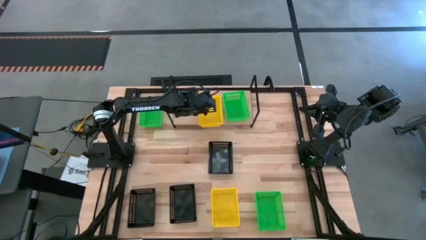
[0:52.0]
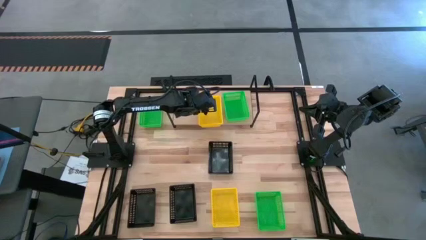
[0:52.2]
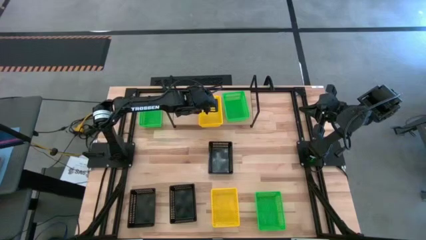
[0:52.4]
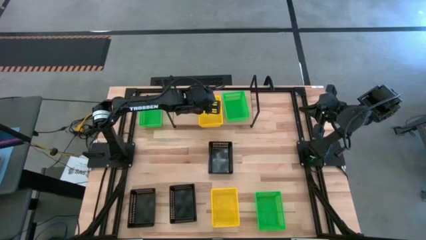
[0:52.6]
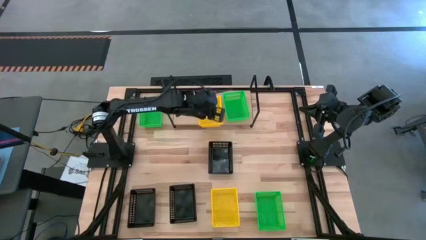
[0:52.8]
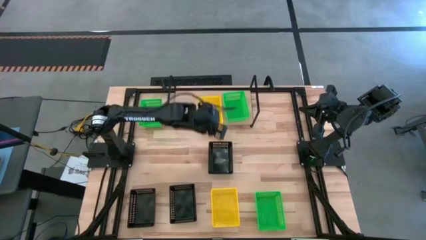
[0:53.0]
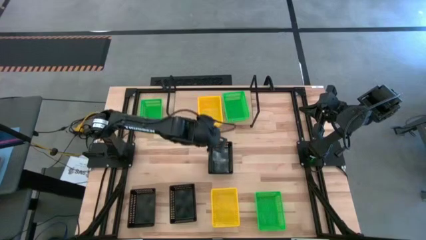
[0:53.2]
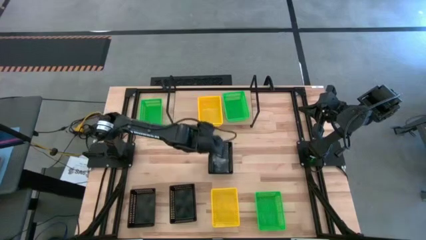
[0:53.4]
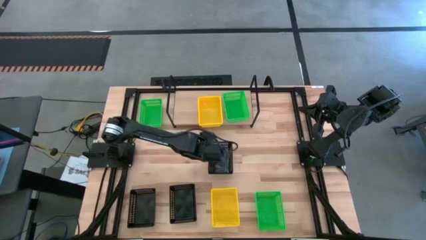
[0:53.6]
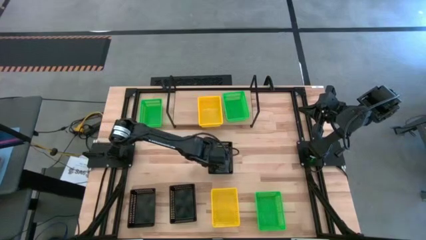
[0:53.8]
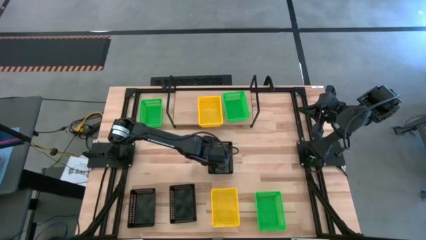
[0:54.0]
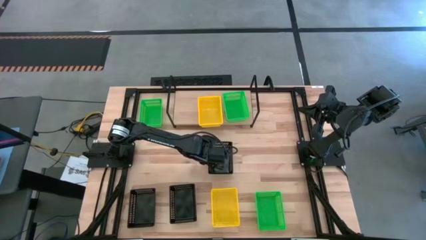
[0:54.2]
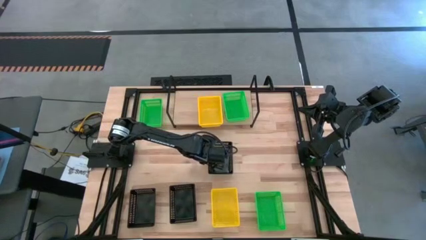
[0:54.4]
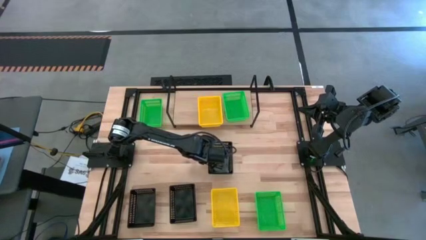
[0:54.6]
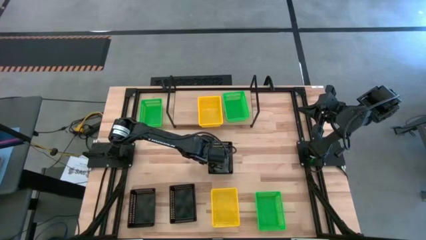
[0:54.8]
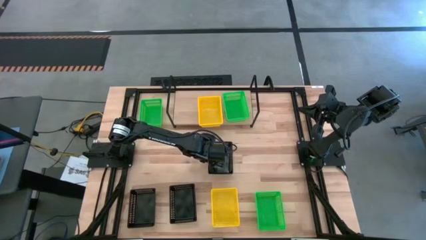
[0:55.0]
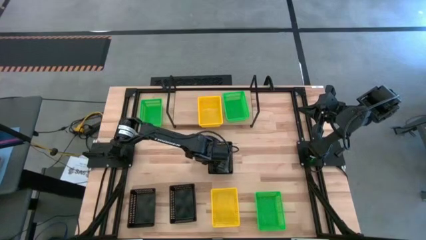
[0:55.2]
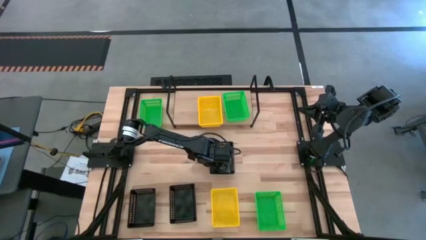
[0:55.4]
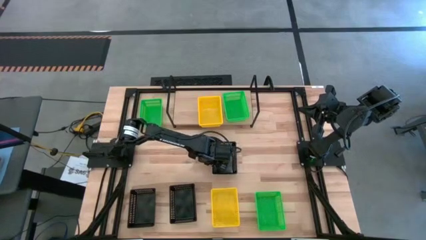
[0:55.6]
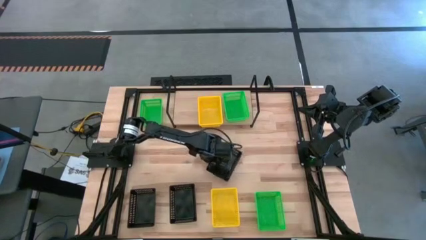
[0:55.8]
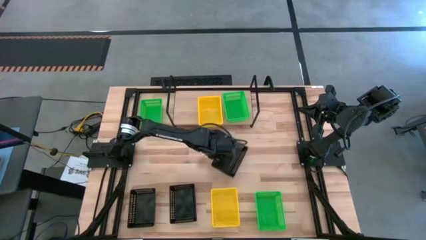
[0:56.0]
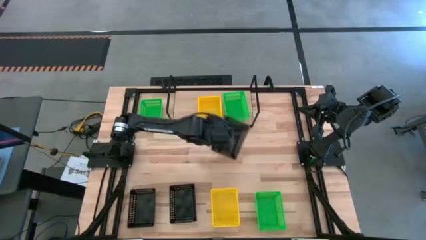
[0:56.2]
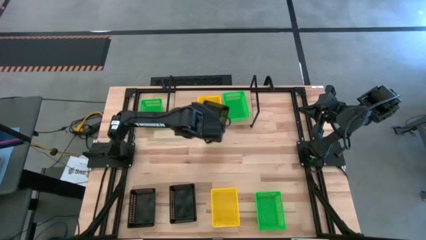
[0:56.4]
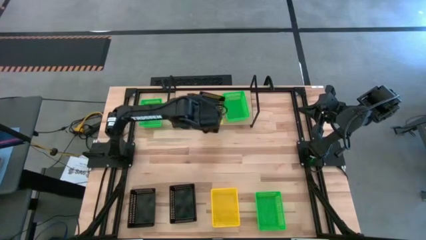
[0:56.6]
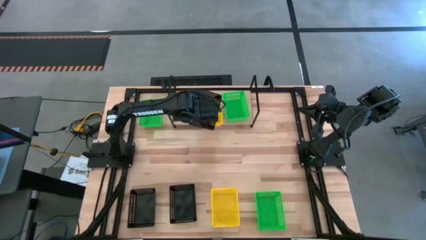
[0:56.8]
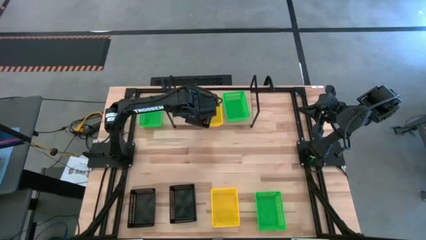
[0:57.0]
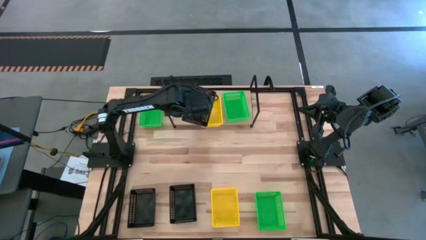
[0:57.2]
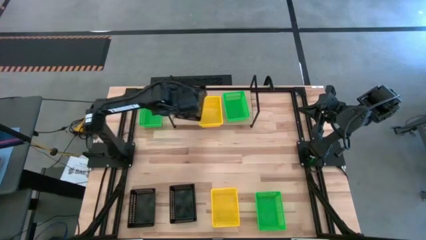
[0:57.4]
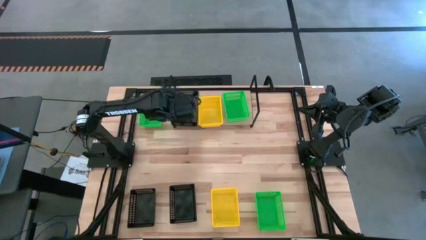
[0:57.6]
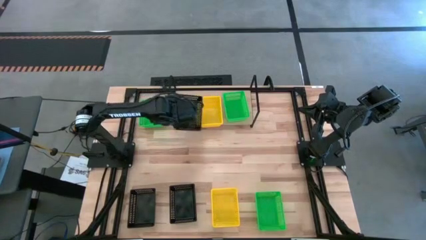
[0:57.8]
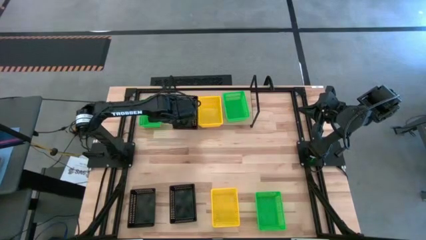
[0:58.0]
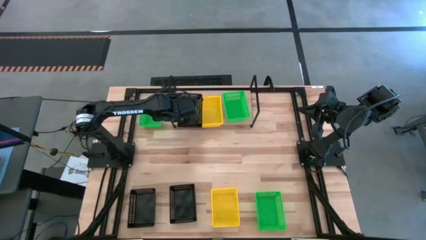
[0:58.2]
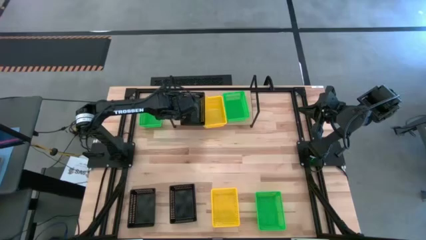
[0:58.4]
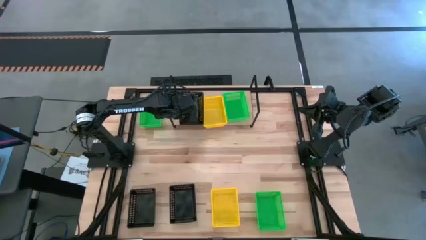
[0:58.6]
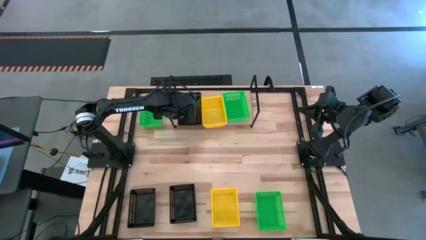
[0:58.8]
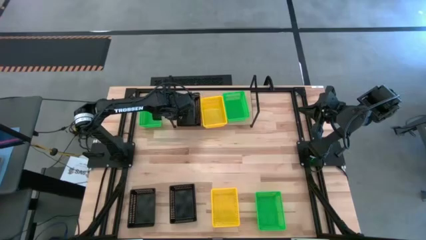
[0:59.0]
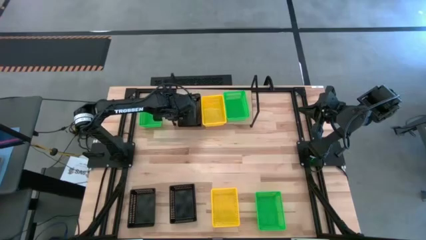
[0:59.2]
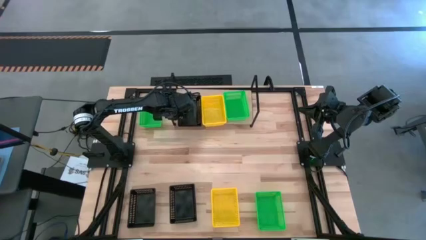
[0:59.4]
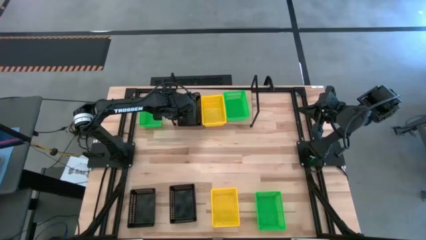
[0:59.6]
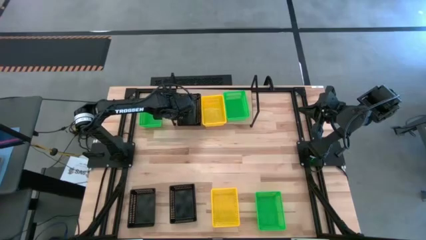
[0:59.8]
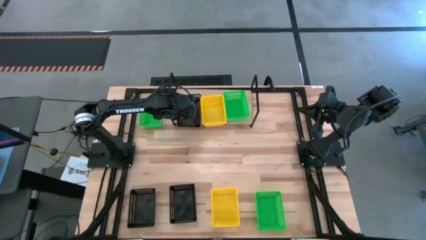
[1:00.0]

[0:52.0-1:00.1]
Task: Stack baskets on shelf by color
Put the top black bin on the shelf

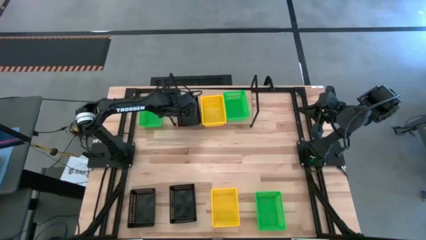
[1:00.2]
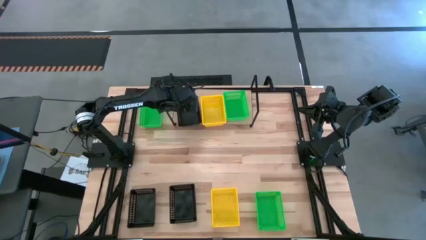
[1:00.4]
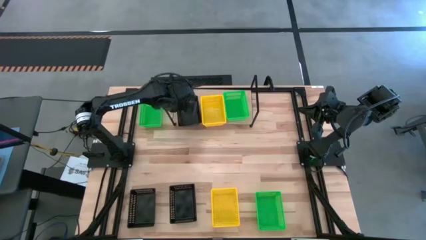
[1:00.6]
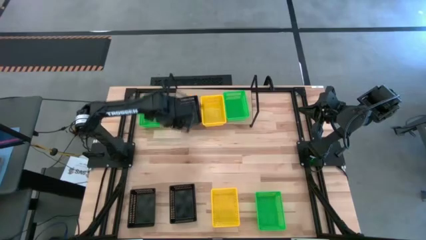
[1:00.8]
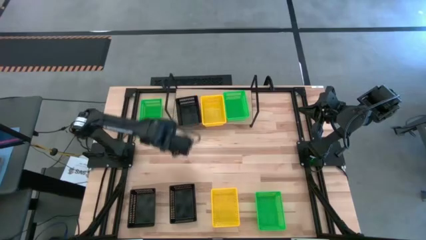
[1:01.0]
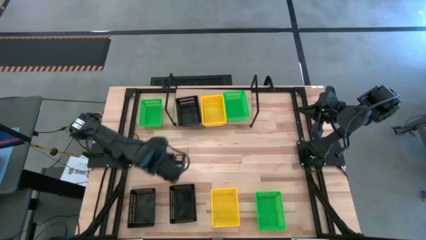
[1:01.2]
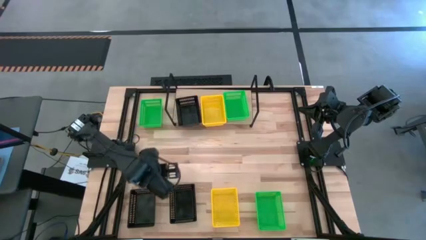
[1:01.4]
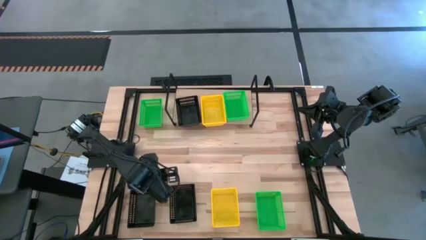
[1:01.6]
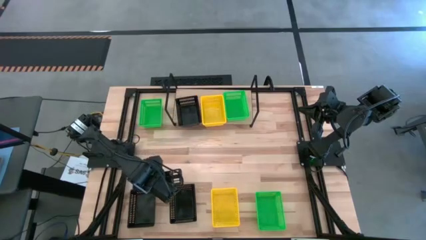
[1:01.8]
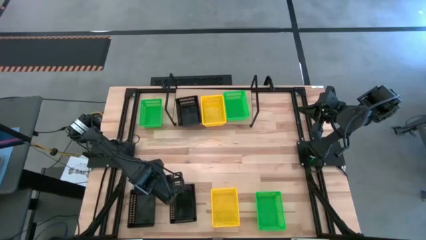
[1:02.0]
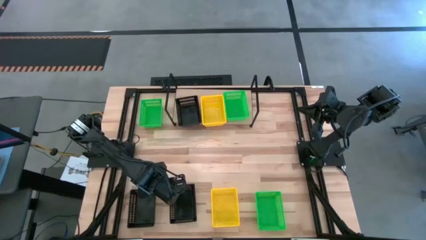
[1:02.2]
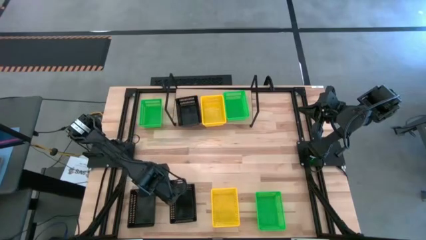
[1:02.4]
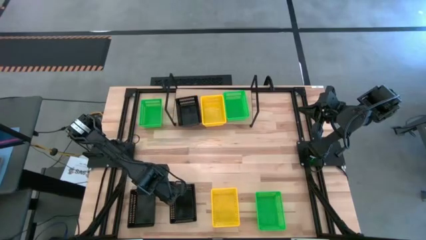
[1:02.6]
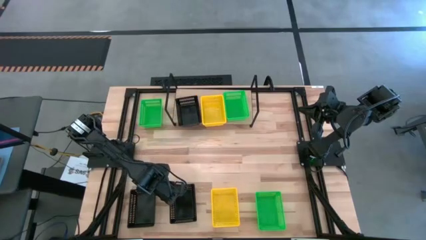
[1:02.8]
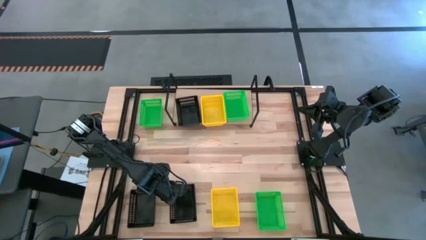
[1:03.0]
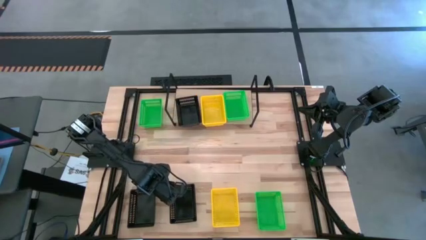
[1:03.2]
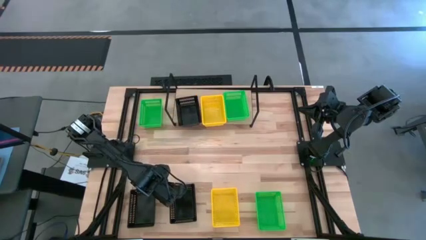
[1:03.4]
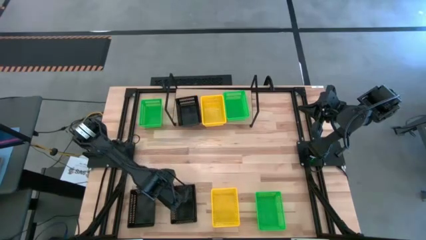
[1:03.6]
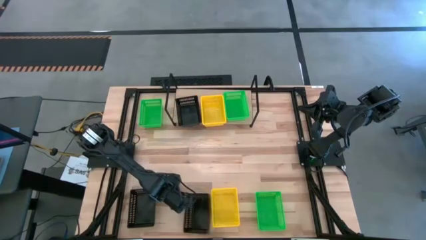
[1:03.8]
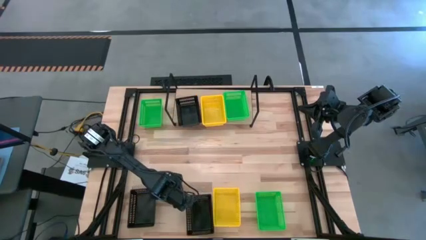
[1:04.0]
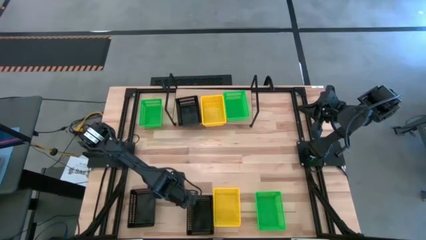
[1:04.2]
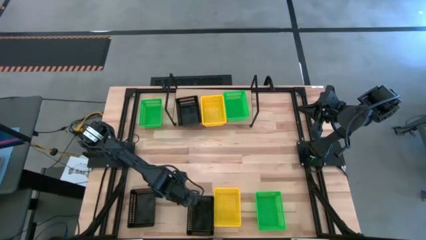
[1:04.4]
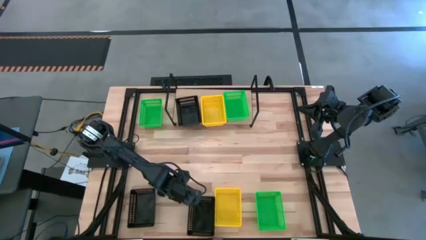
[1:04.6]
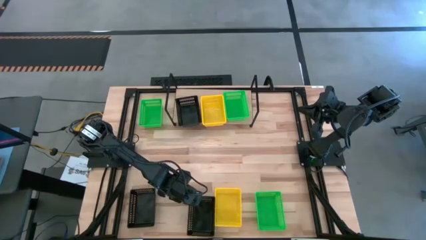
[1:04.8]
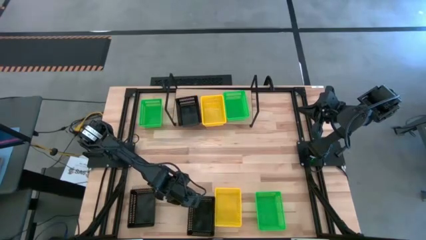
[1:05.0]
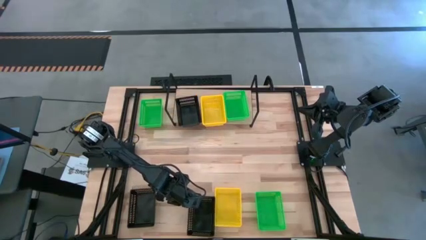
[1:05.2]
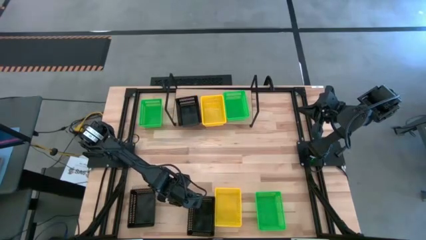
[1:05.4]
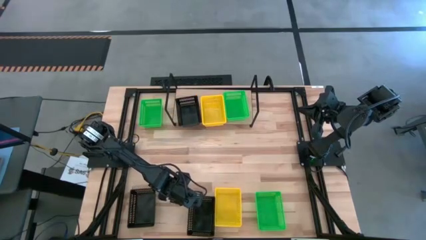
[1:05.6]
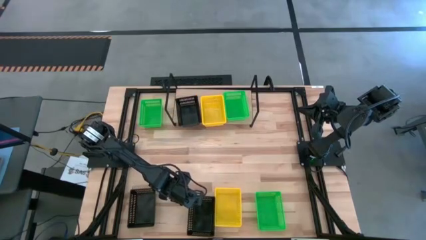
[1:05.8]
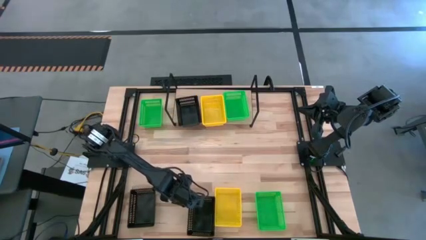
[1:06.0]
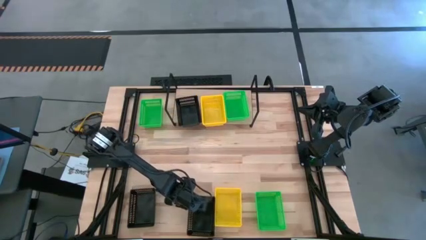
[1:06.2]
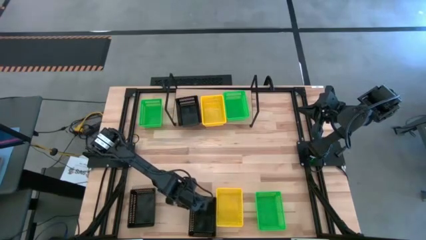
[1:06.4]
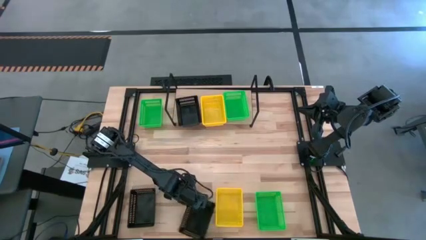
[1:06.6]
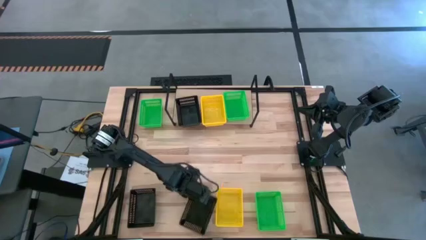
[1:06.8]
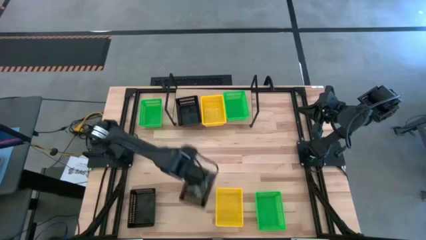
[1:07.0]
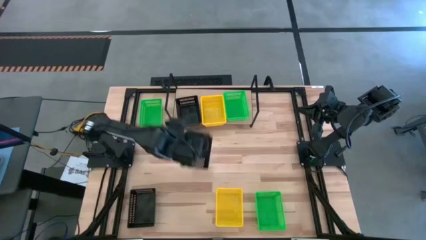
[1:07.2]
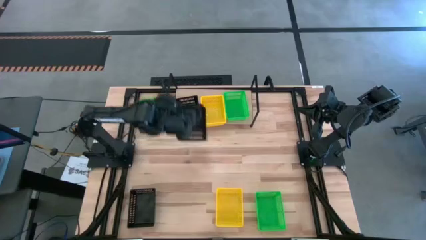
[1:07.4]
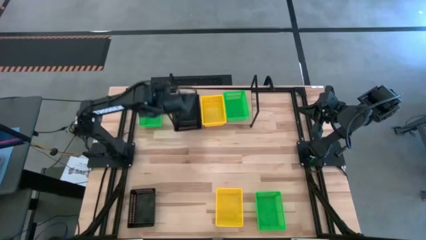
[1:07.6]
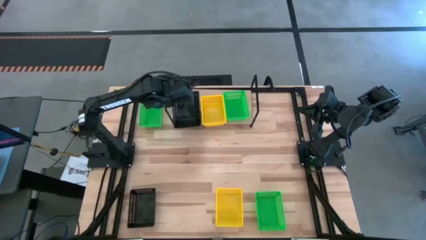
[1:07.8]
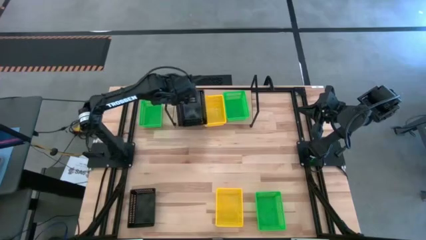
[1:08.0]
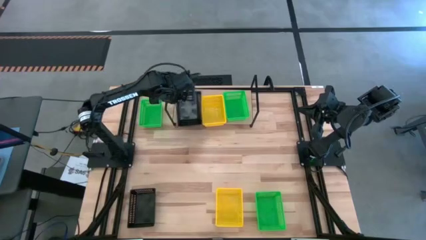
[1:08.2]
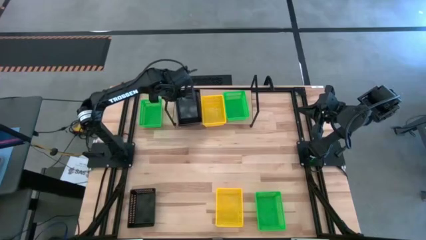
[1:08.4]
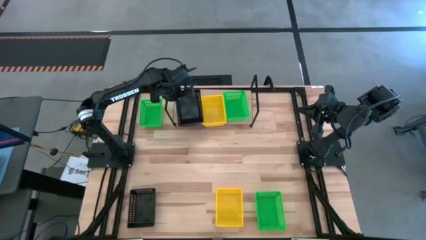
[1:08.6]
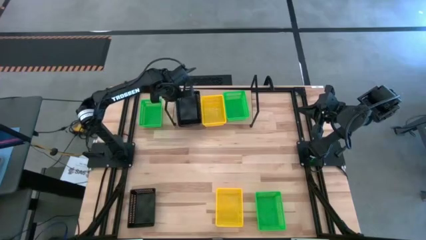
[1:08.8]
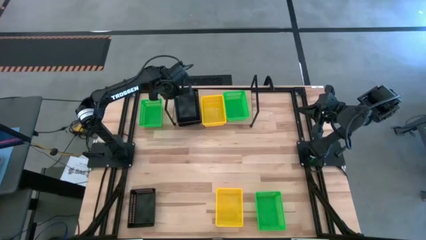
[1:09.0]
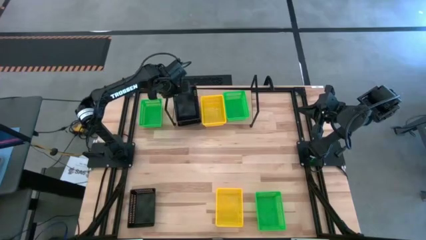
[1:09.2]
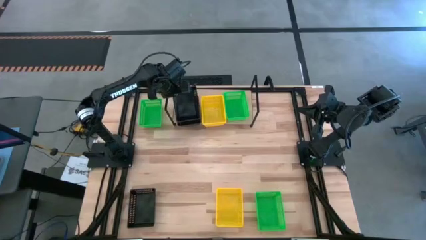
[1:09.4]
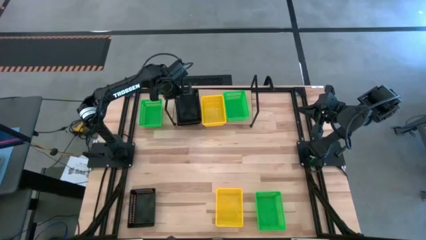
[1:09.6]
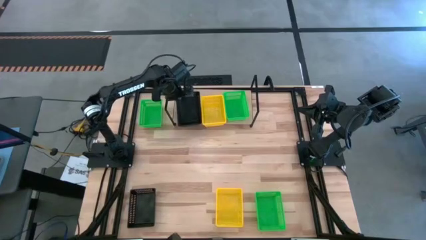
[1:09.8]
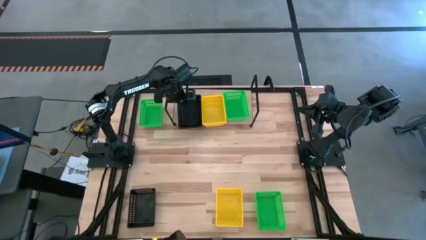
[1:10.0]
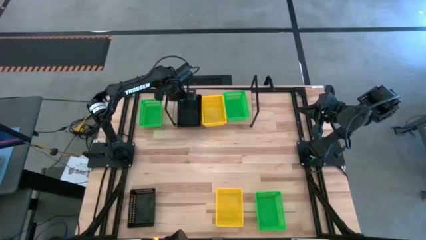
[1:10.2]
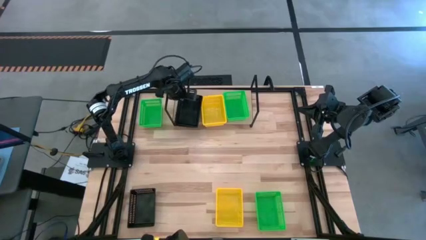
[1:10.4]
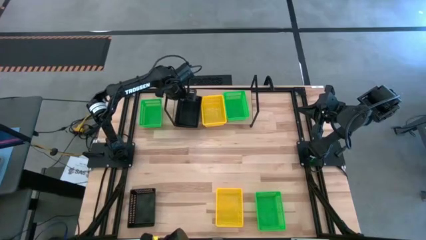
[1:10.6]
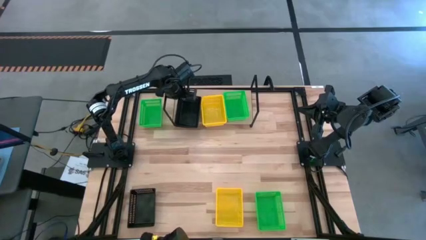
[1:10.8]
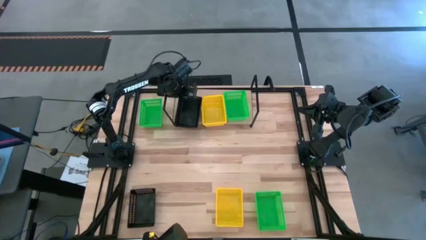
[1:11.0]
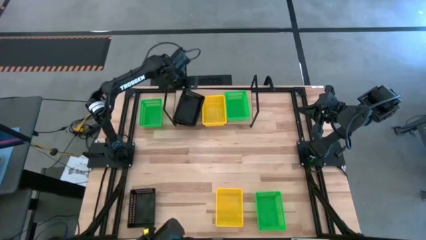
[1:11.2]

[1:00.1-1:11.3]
Stack the right black bin on top of the black bin on the shelf
